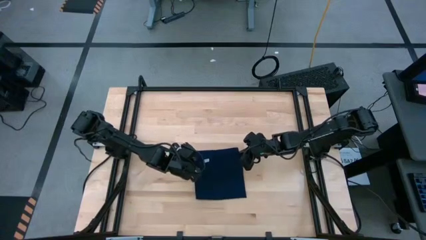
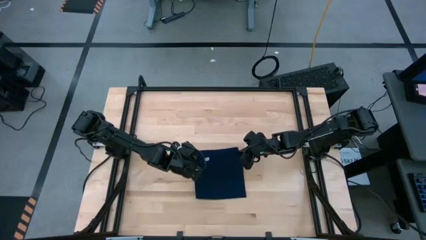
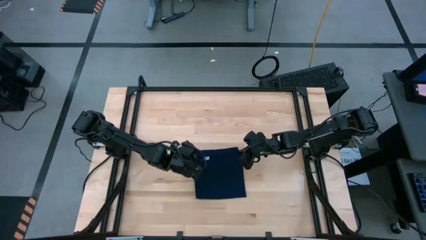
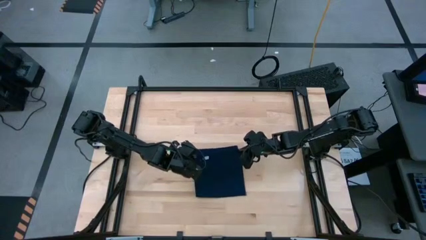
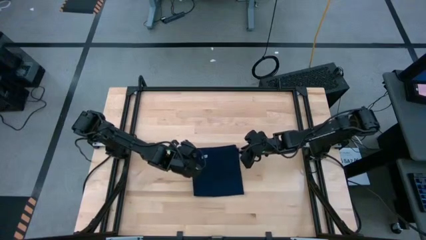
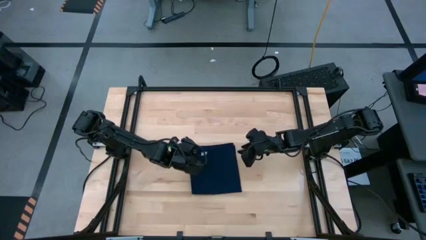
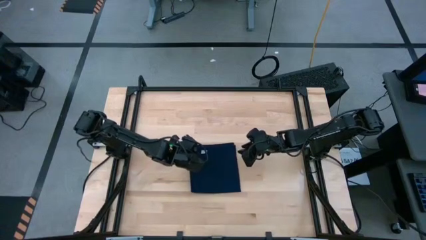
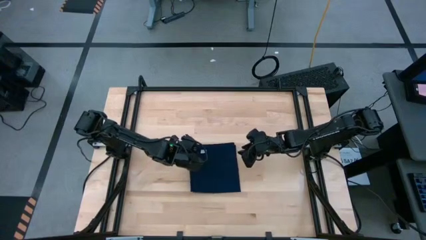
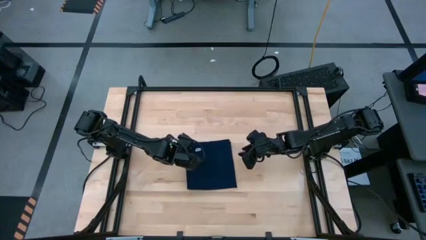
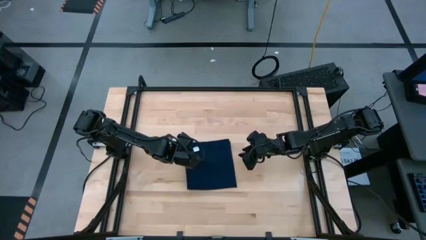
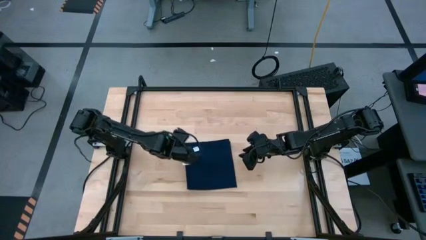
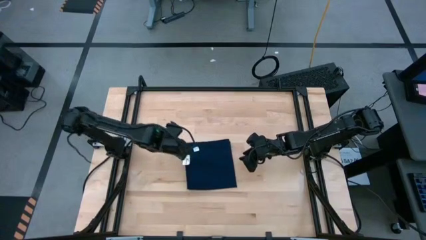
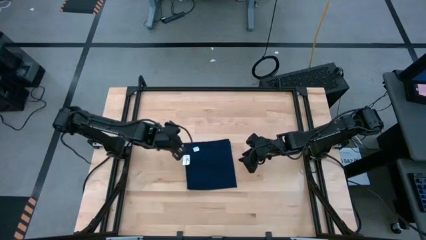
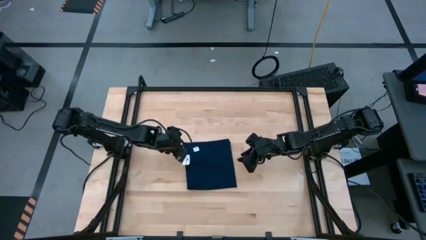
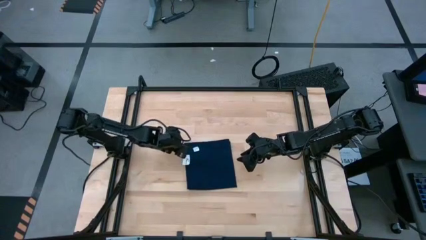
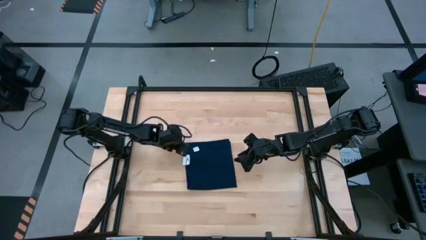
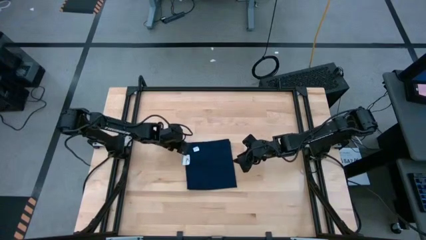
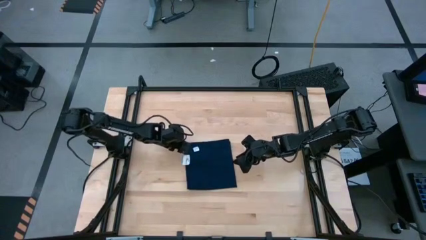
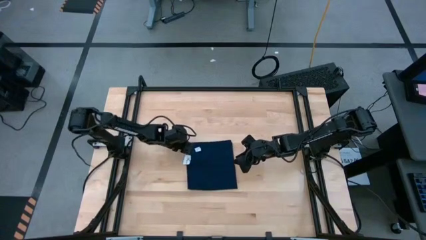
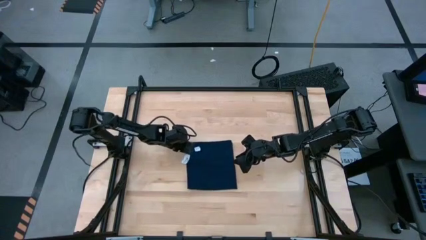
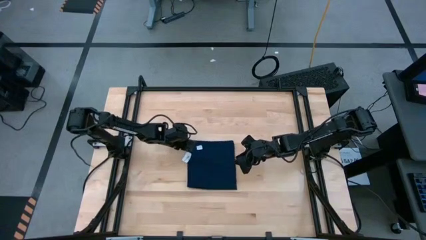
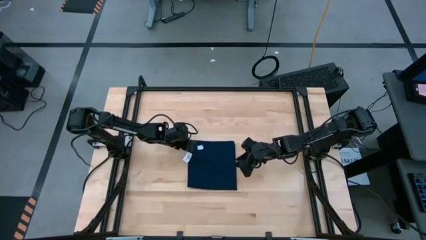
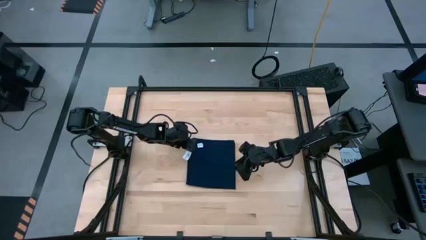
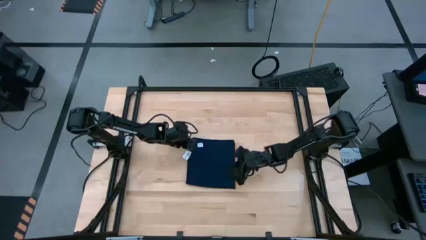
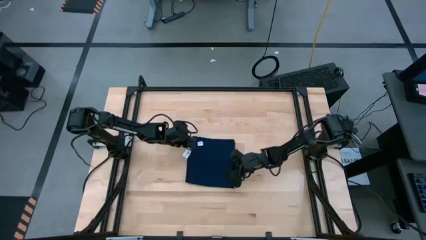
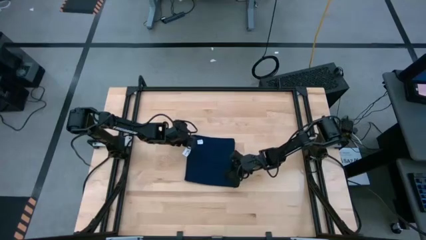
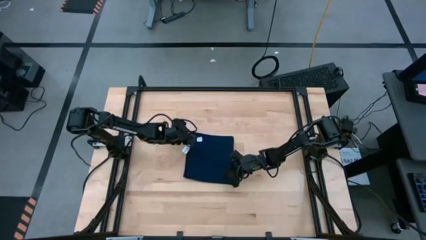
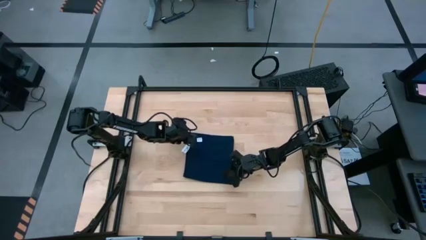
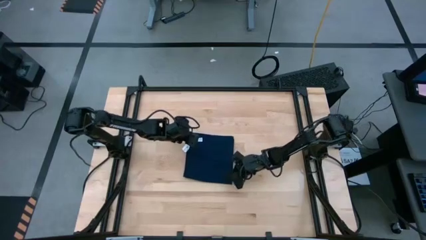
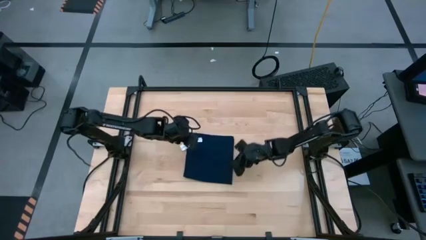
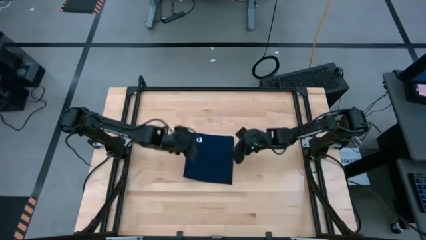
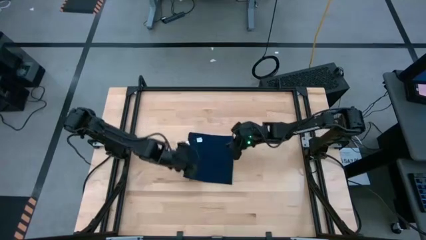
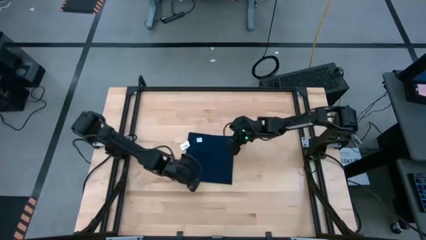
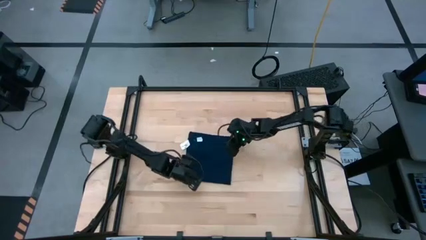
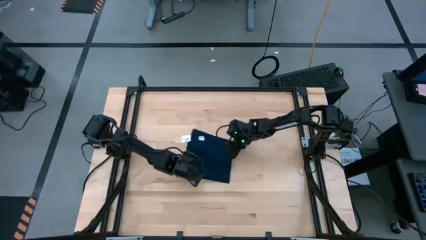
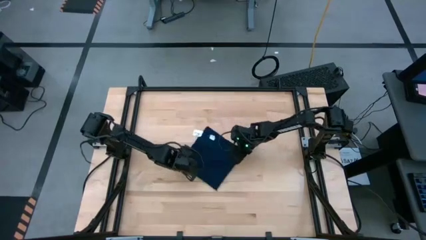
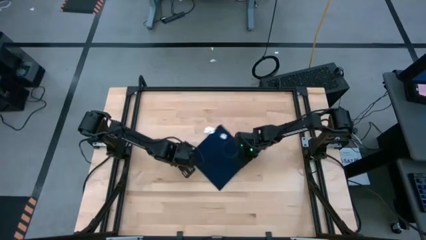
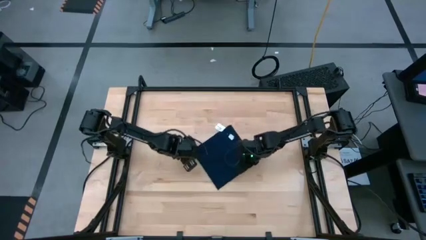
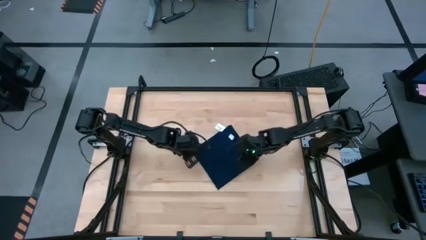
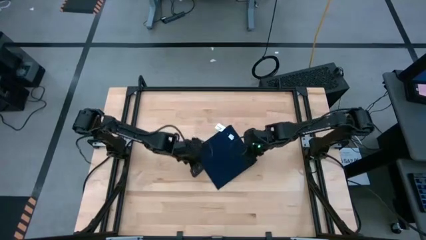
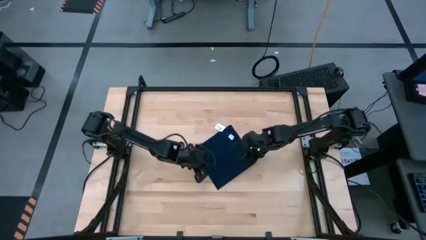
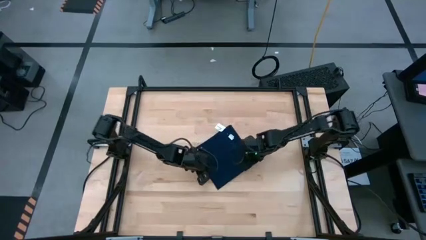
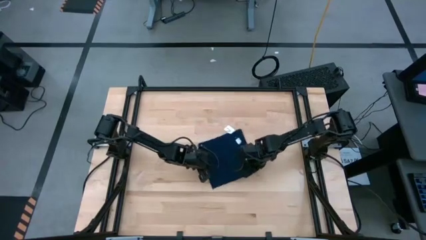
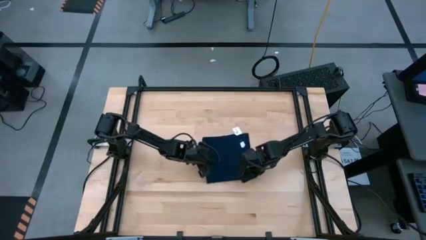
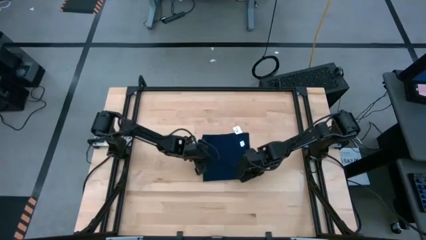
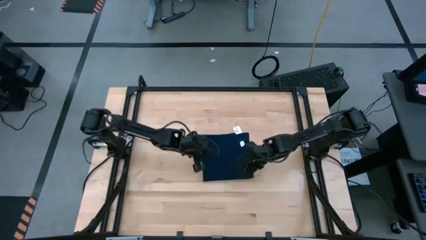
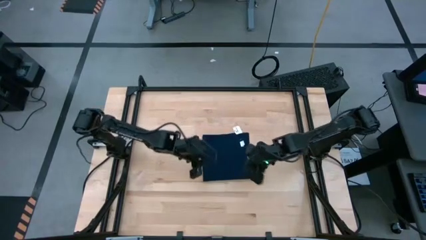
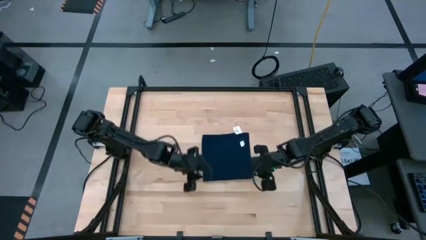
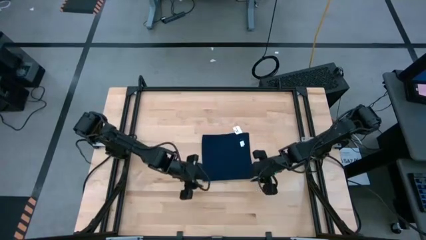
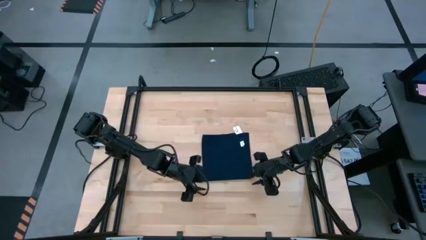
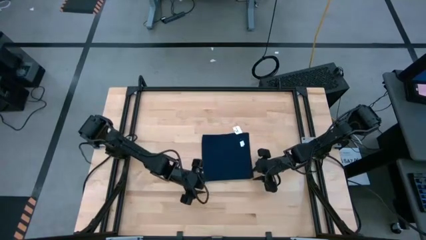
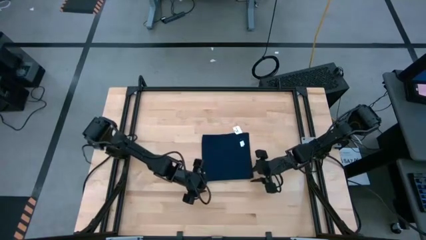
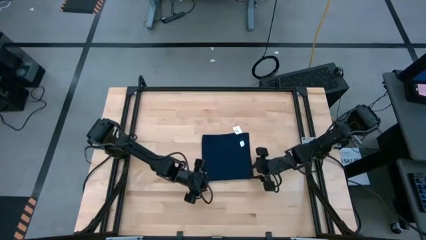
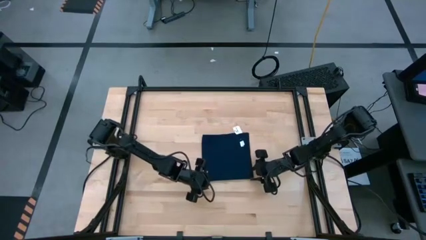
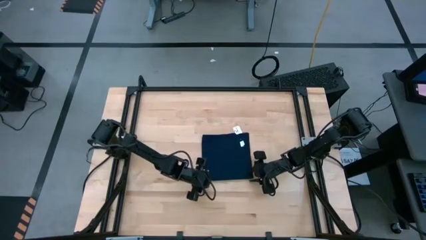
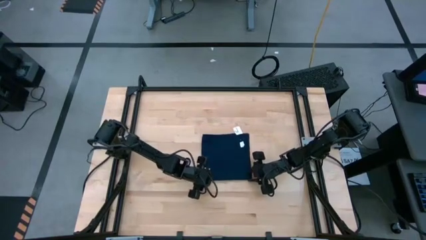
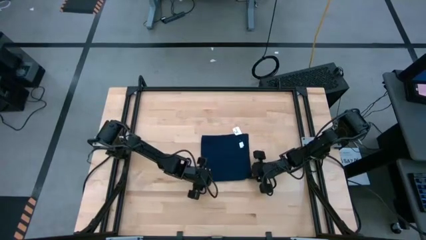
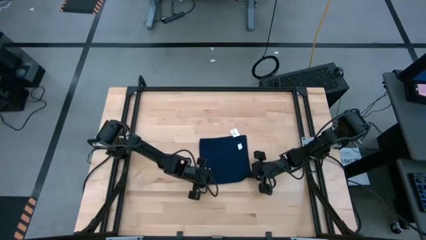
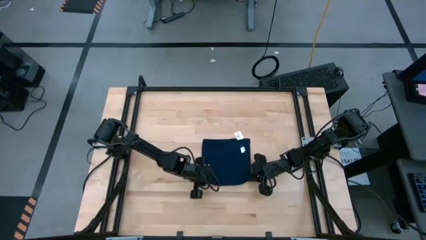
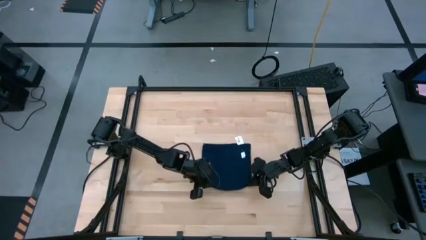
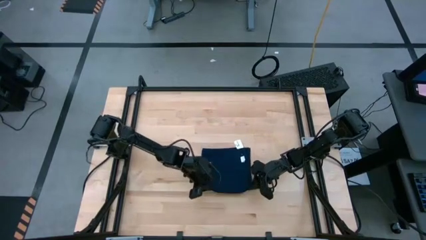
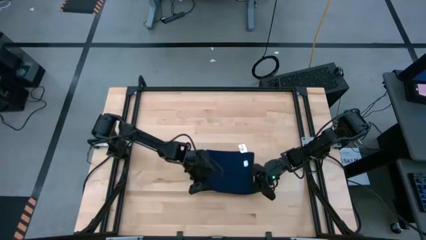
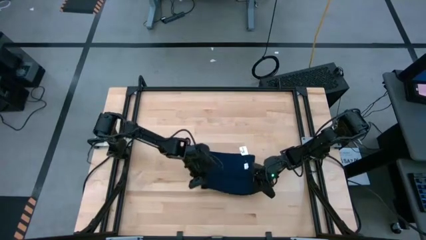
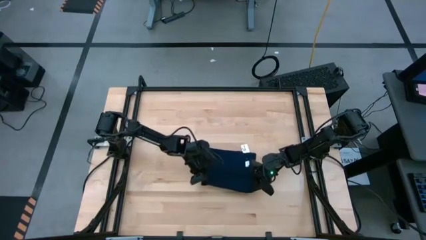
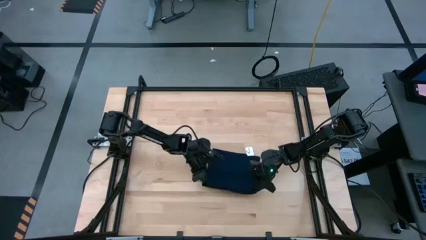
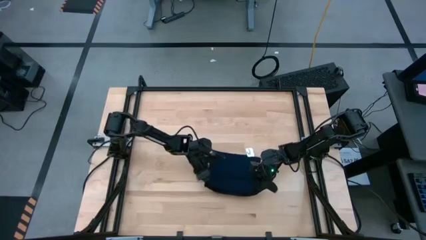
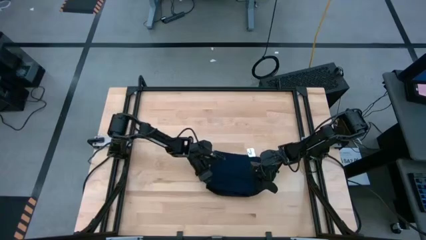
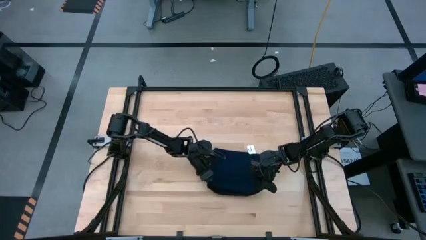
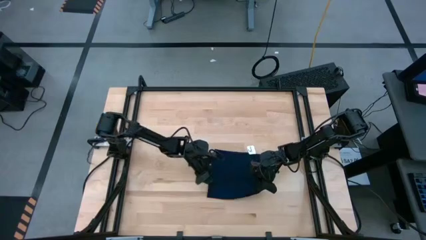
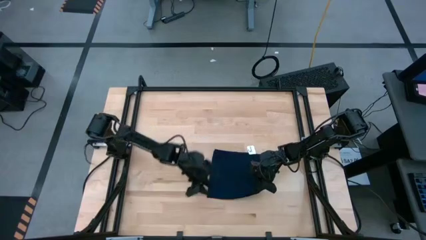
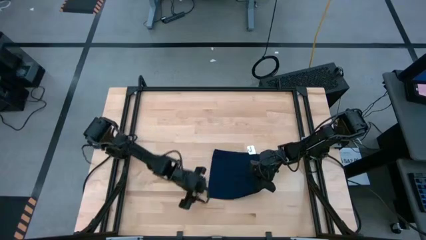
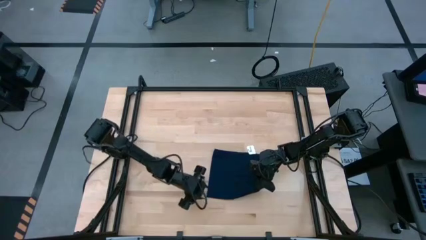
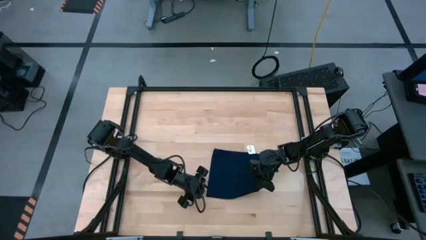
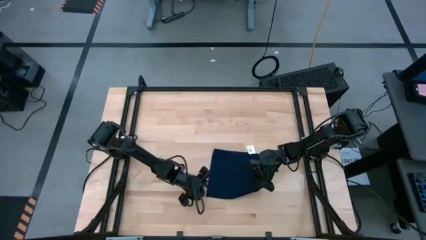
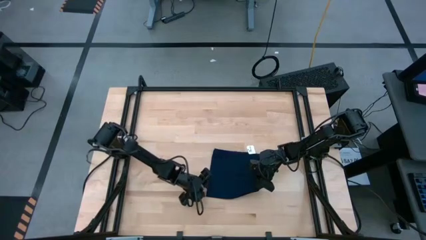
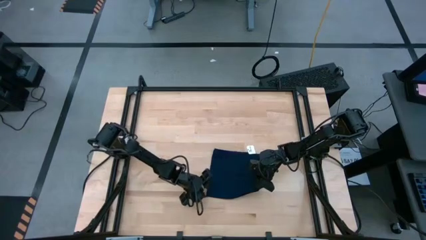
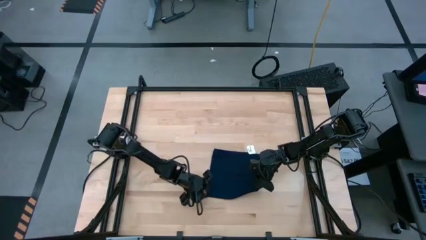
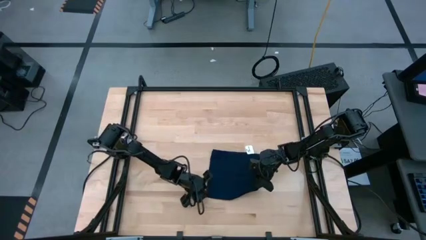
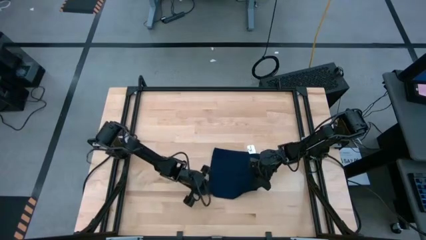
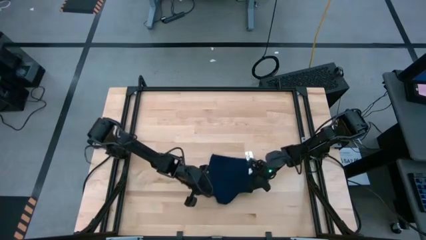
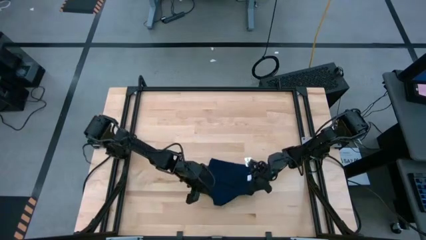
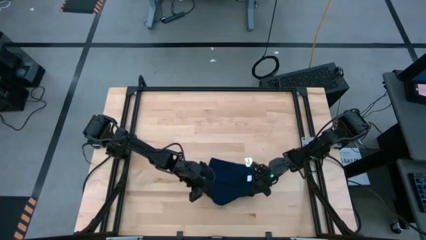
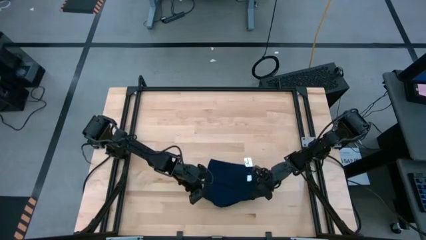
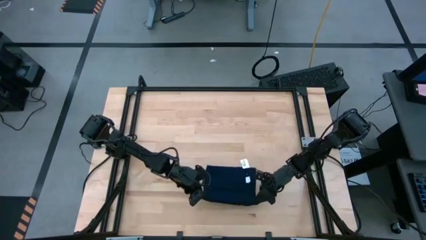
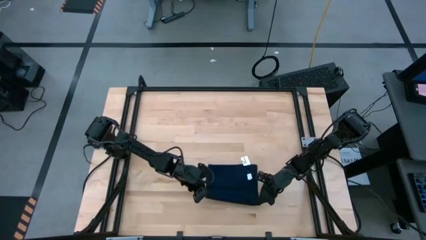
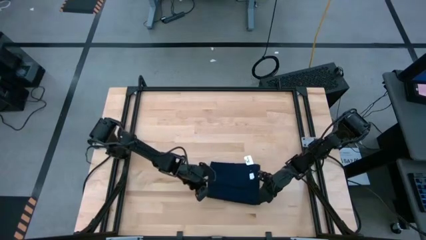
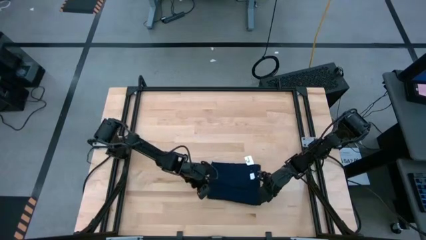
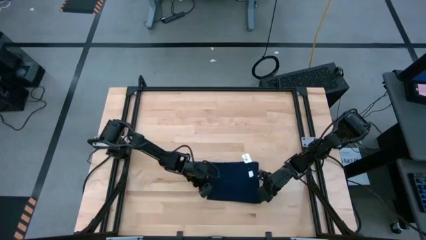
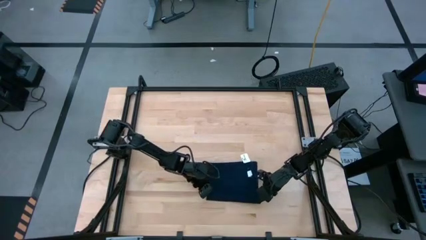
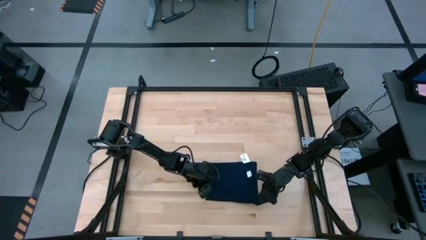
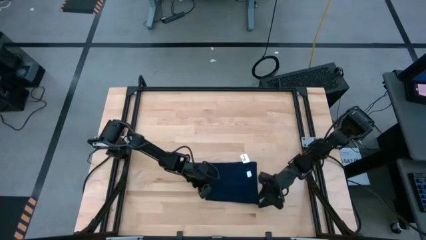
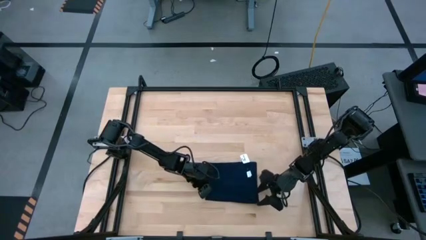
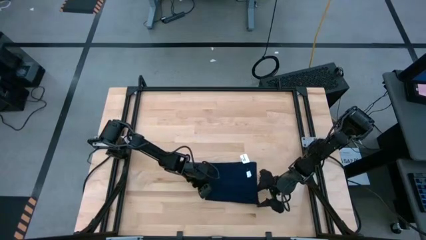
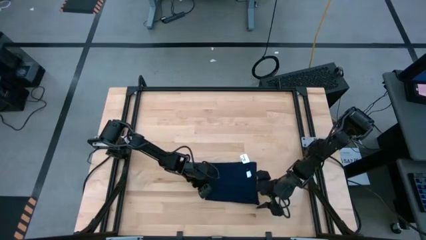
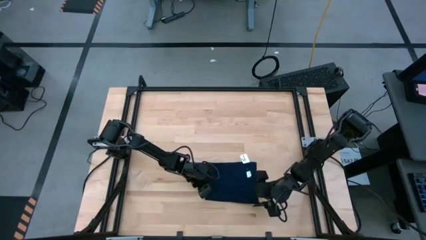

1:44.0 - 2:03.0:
Task: Roll towel into tight, uniform cylinder
Roll the blue cloth napkin
